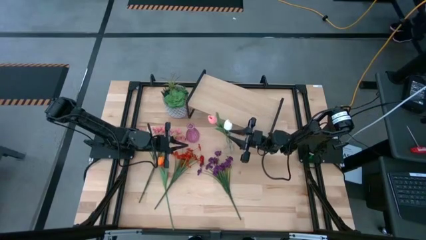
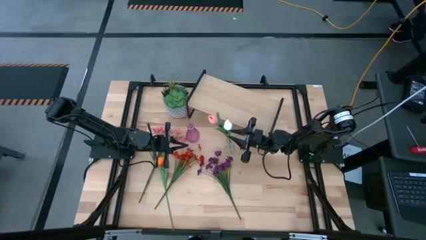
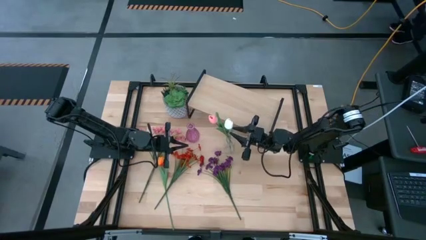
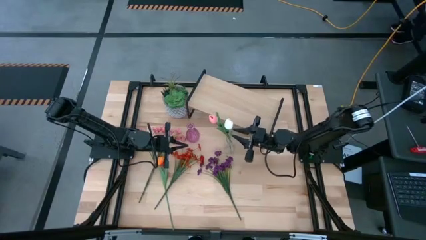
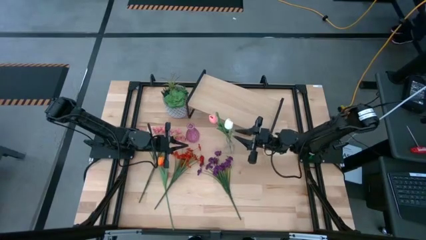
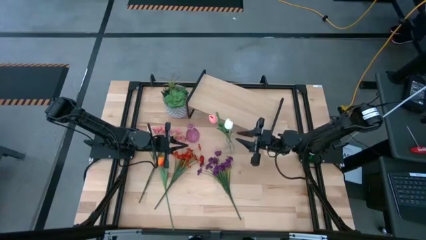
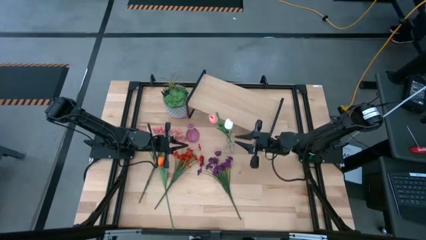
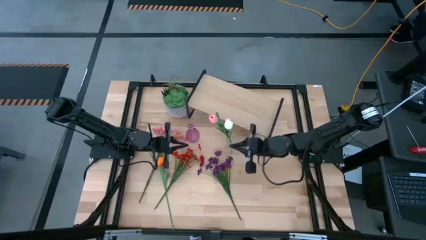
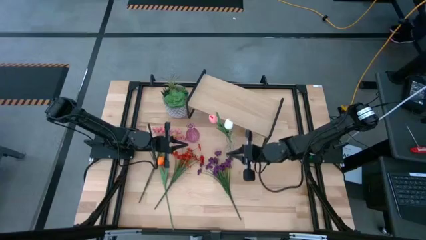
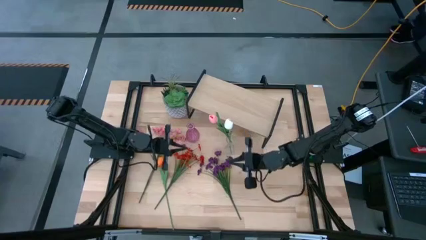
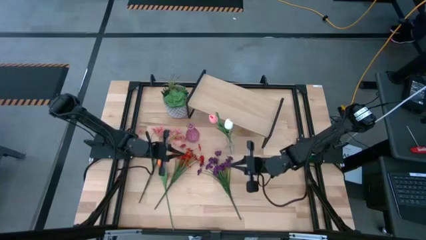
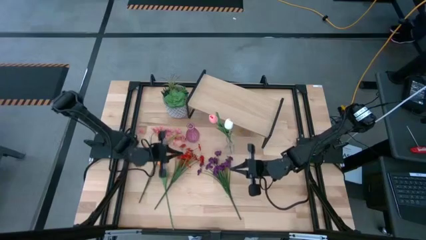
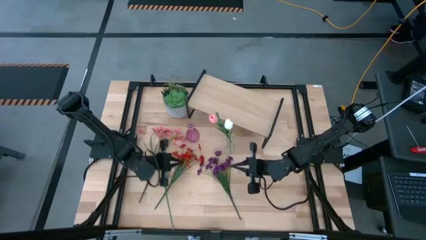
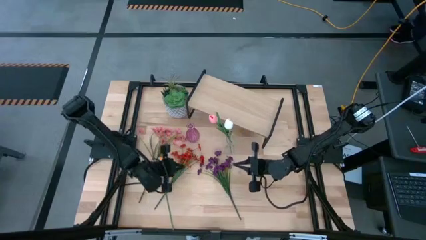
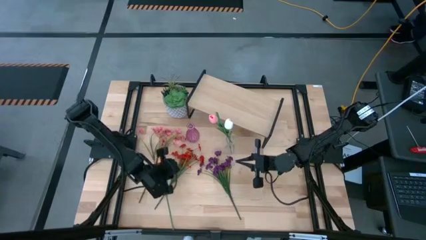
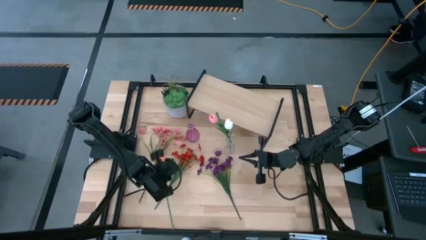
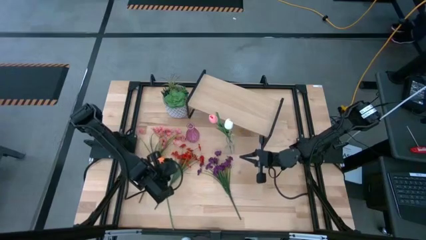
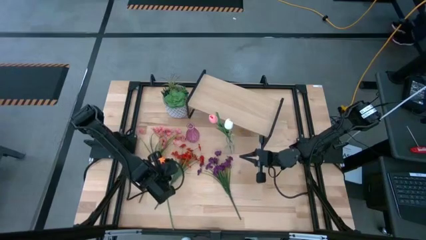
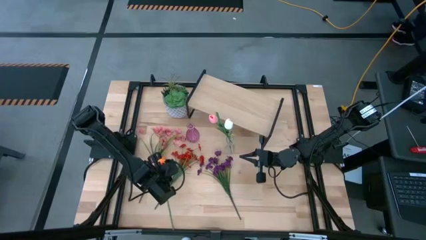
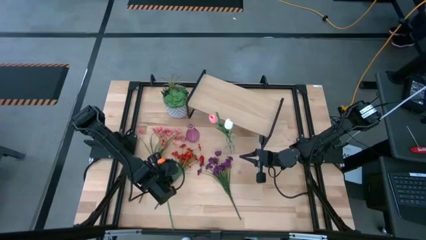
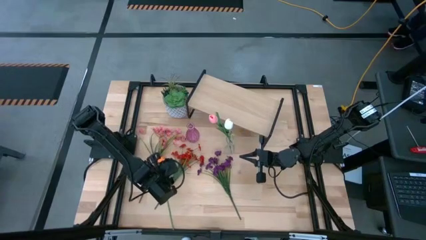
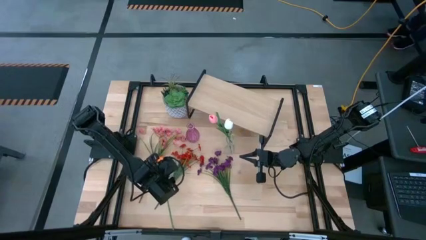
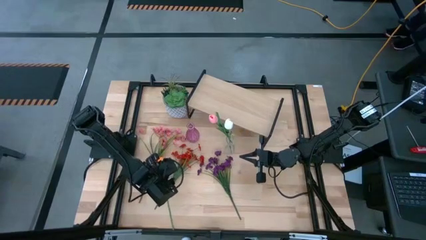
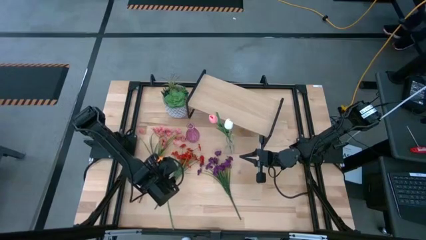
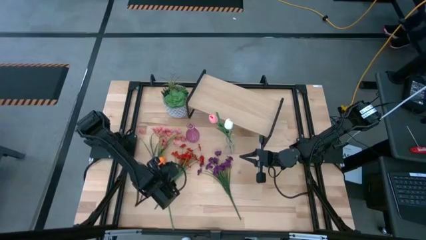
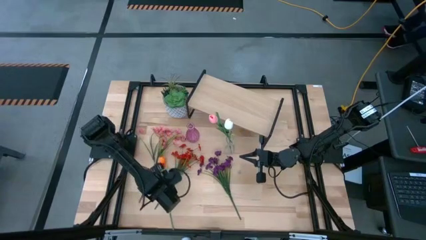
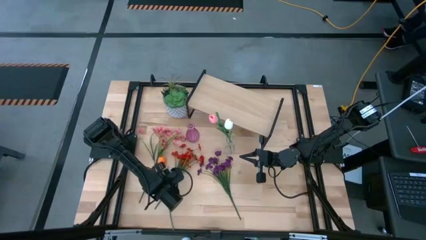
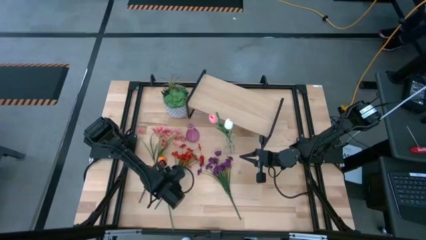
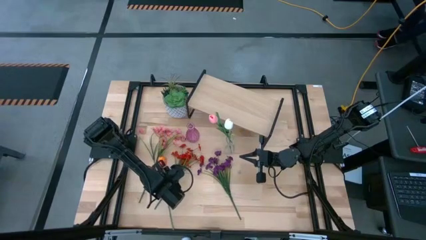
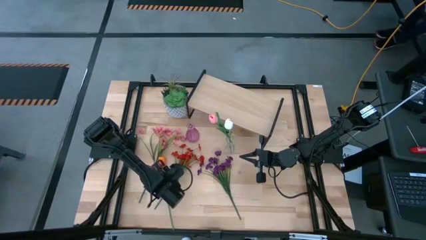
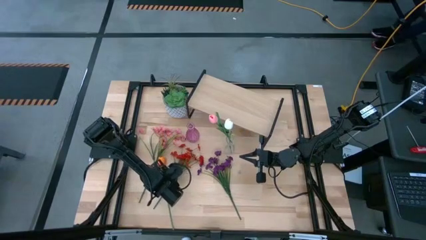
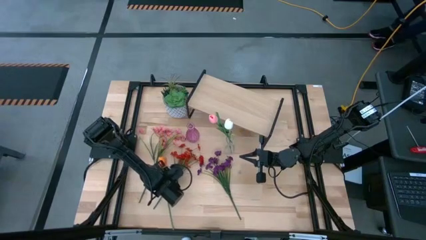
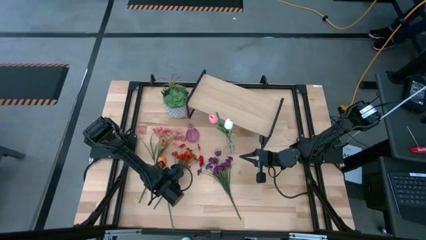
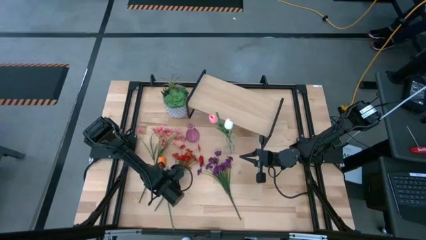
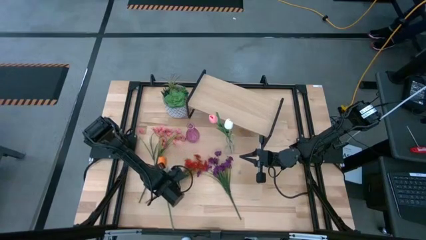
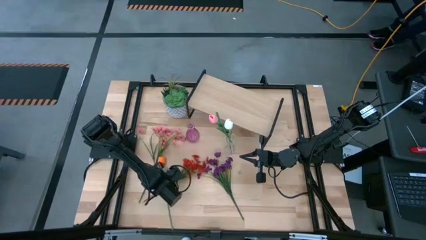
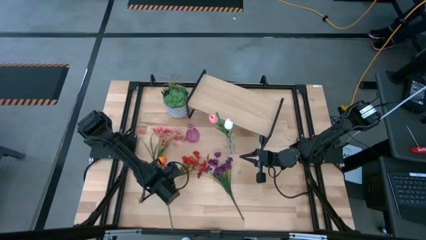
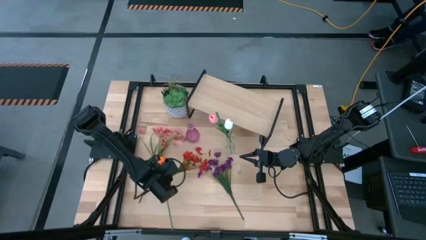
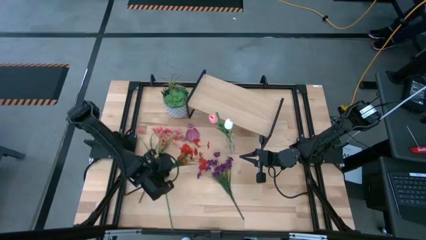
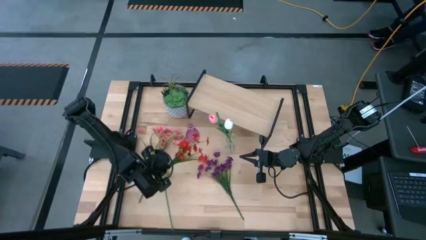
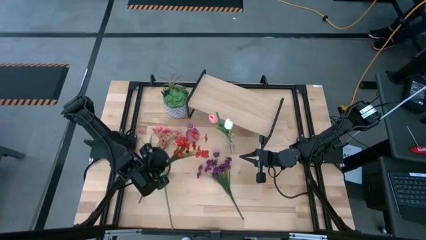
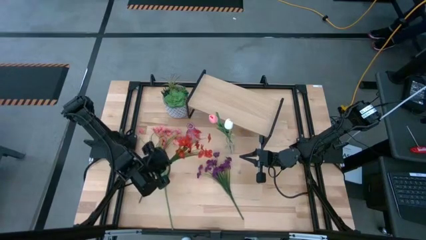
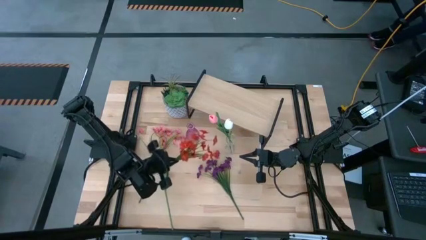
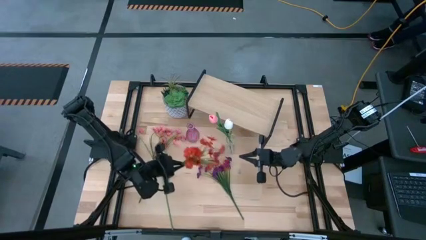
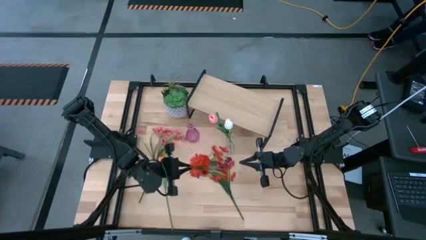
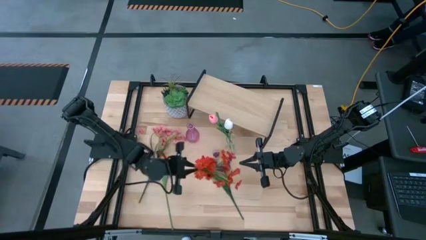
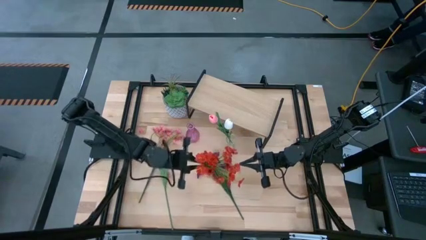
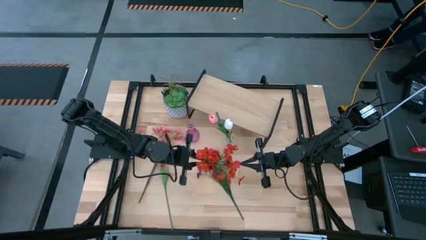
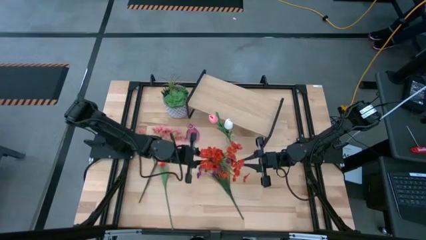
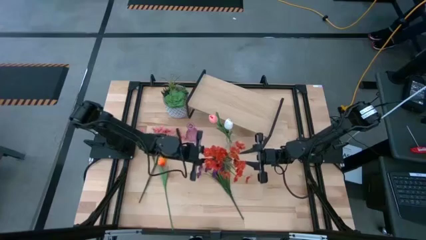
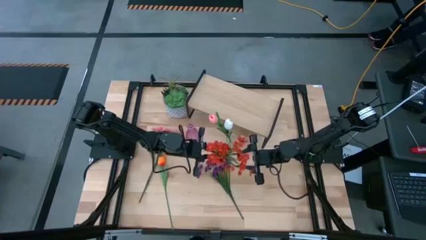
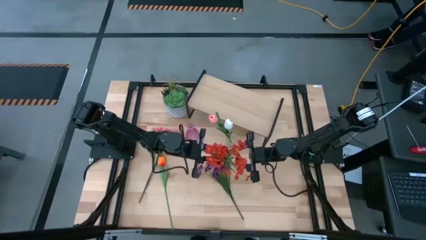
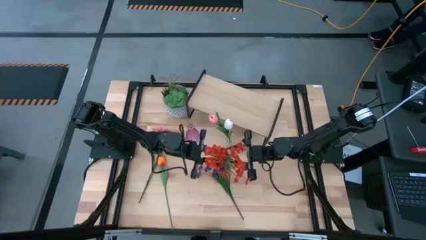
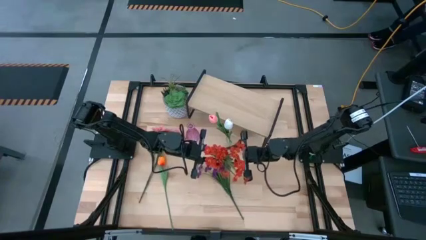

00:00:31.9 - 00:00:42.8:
Task: Pick and place flowers into a vace then onto a shelf
Put the orange flowers into the transparent vase

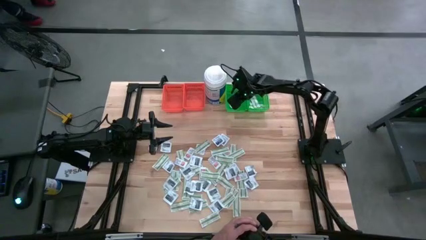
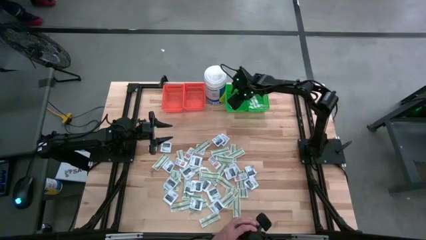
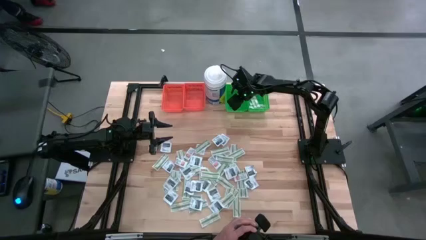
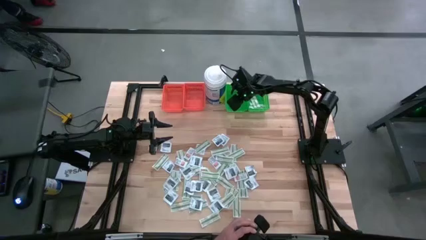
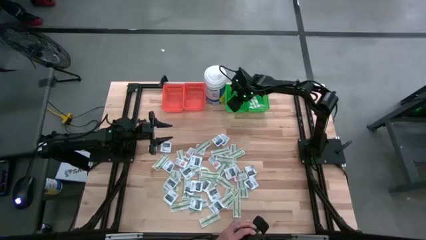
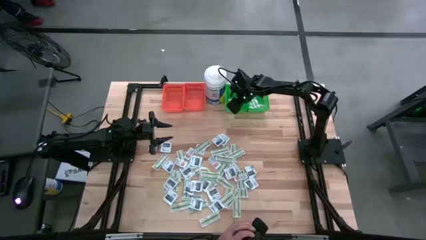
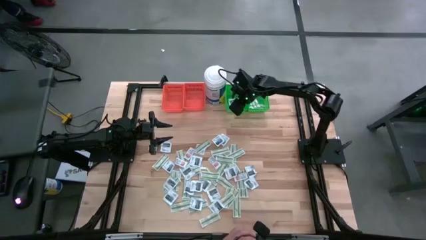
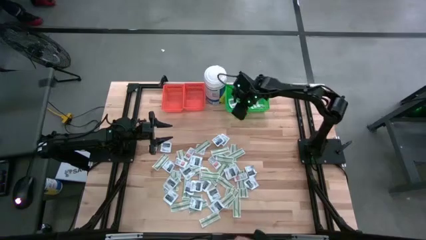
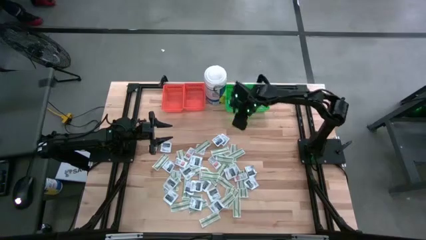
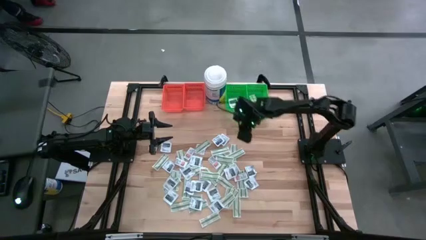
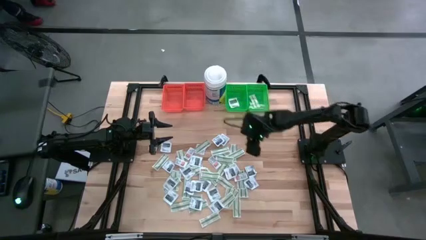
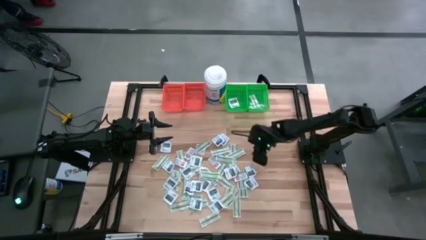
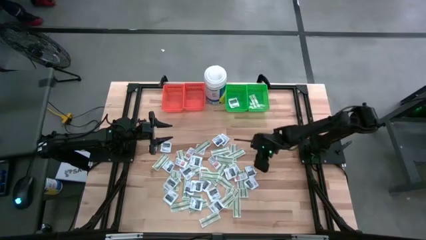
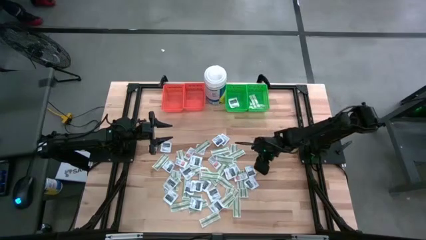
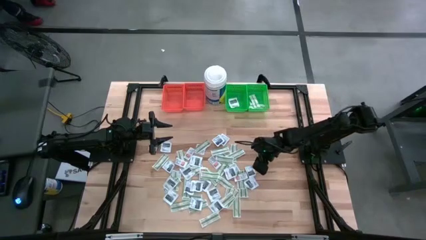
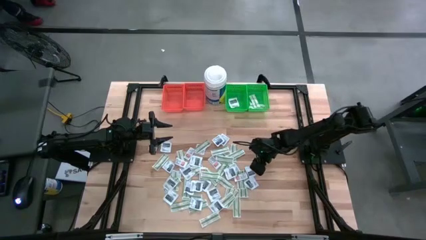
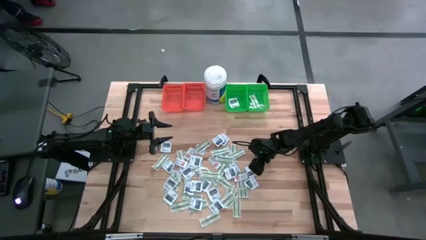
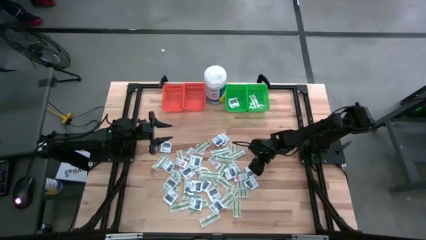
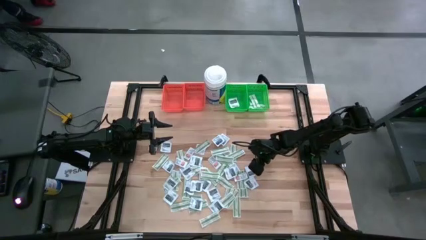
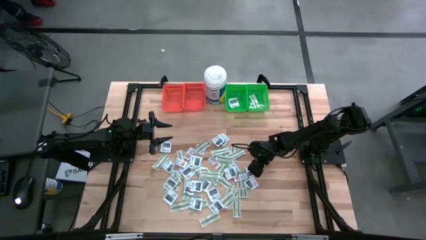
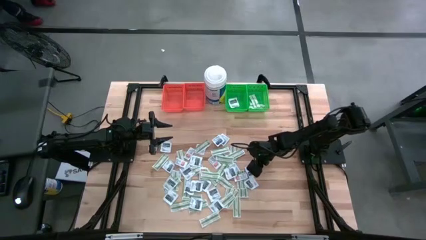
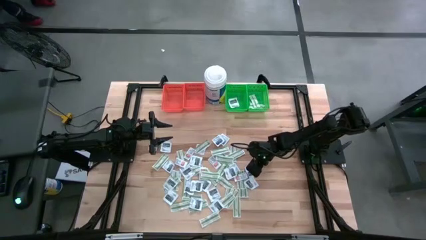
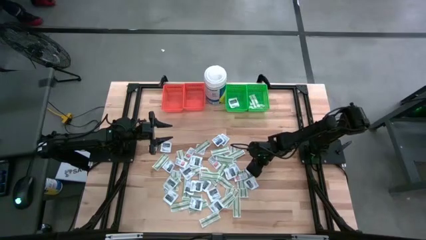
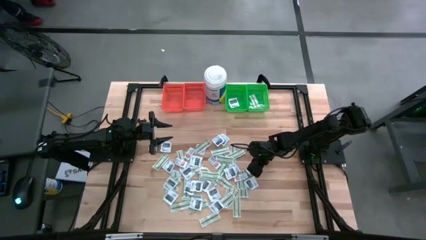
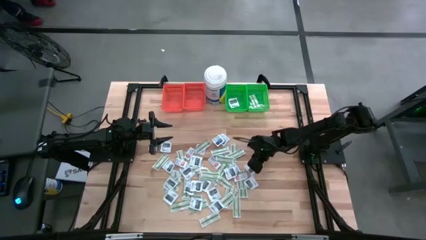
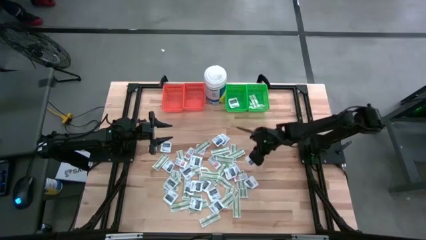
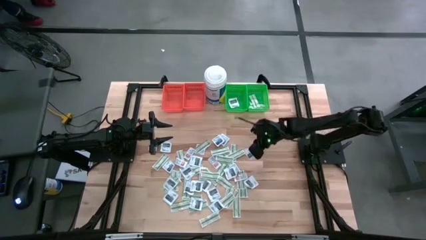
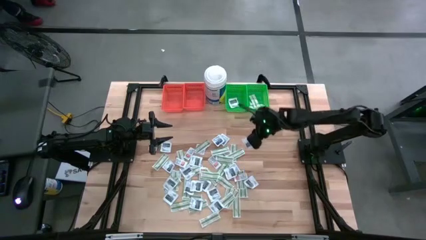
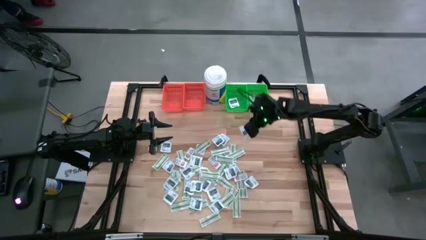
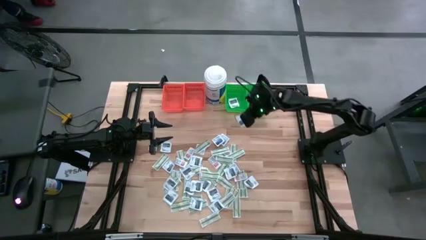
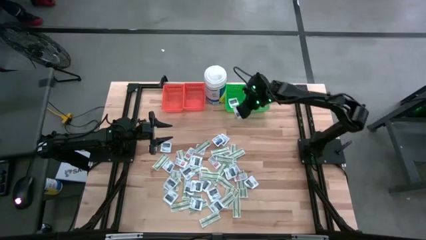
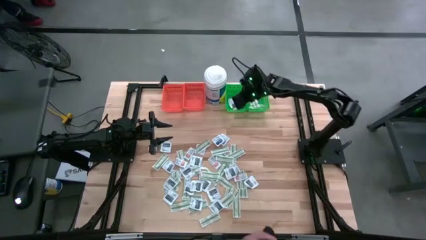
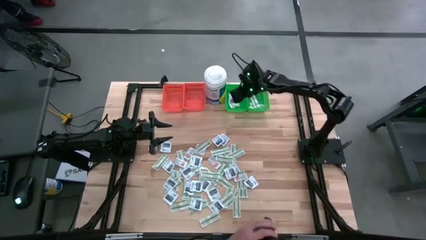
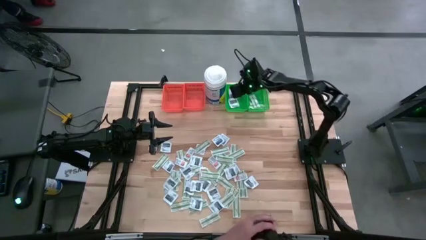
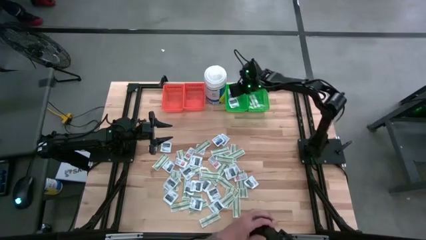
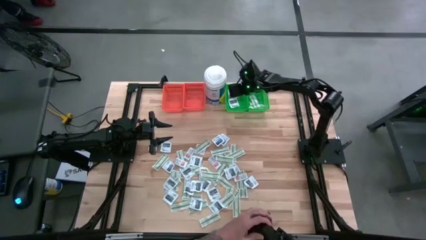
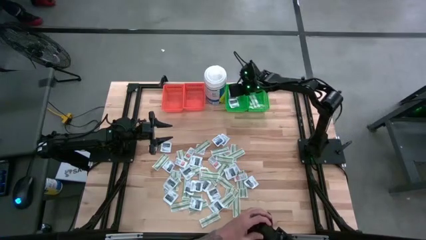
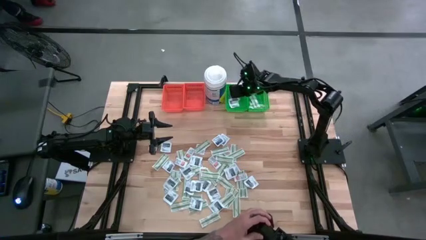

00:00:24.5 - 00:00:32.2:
Task: Pick & Place First Aid Supplies
Put the black towelette pack into the left green bin
